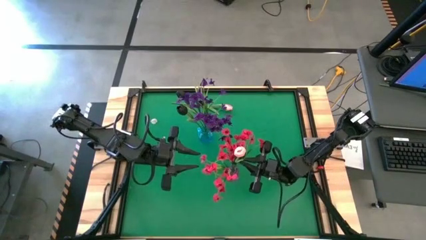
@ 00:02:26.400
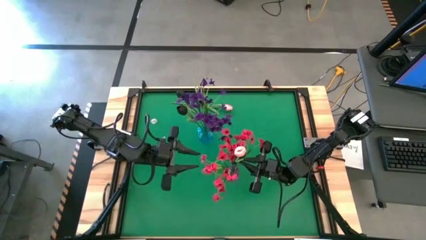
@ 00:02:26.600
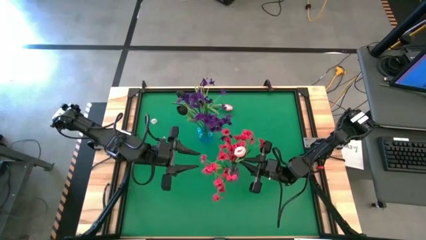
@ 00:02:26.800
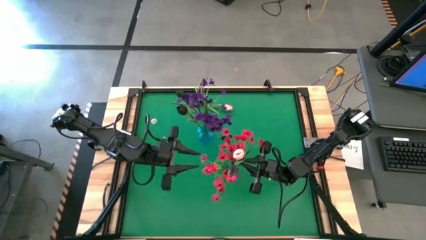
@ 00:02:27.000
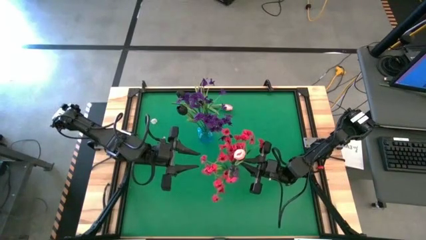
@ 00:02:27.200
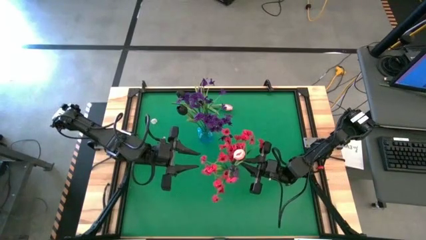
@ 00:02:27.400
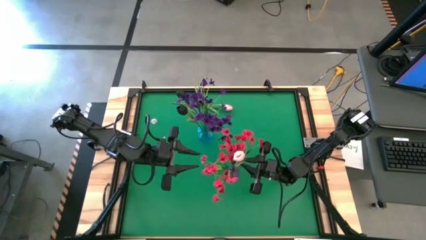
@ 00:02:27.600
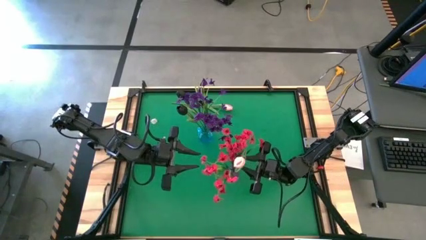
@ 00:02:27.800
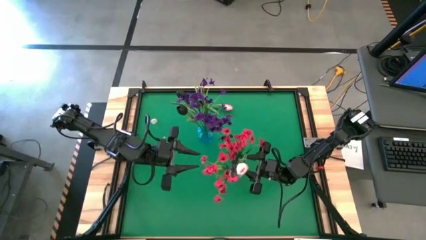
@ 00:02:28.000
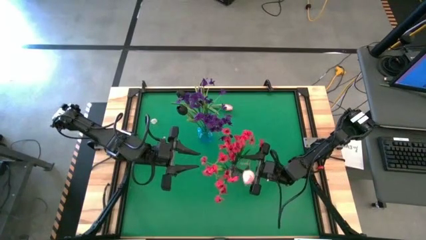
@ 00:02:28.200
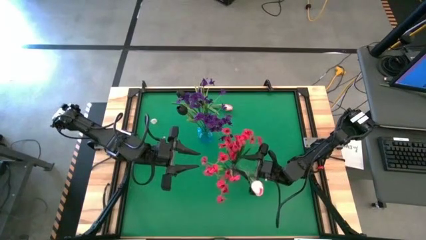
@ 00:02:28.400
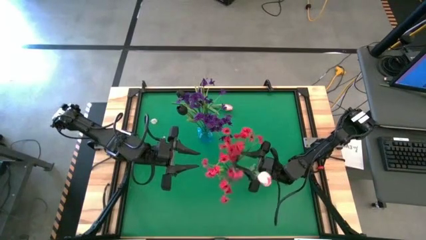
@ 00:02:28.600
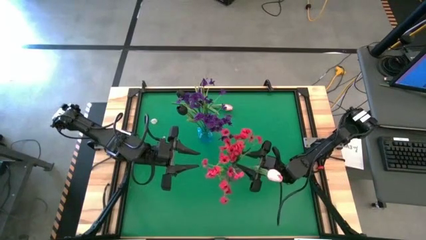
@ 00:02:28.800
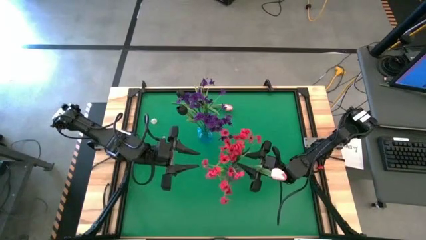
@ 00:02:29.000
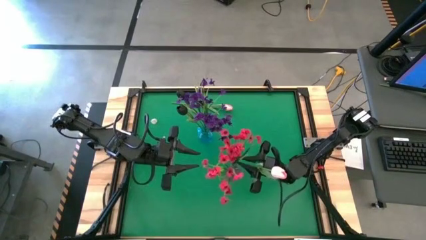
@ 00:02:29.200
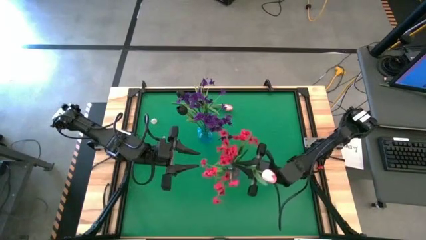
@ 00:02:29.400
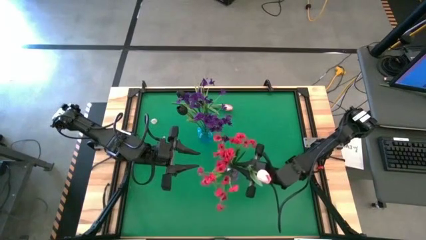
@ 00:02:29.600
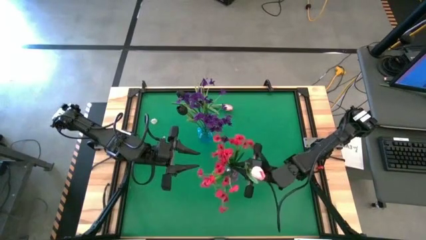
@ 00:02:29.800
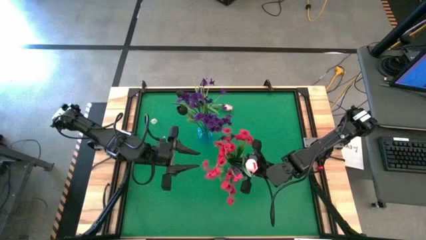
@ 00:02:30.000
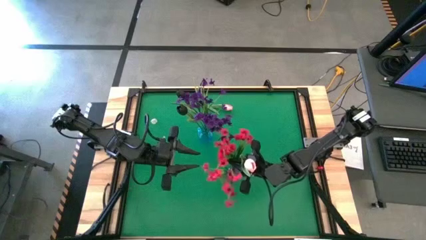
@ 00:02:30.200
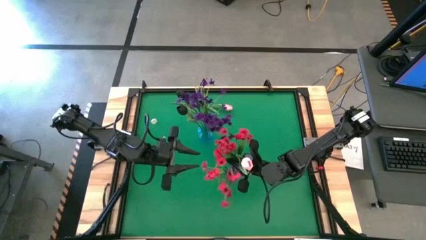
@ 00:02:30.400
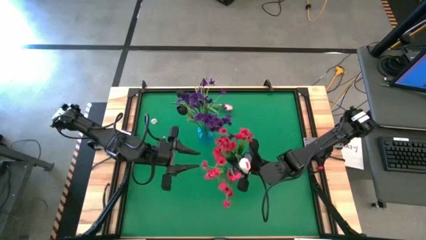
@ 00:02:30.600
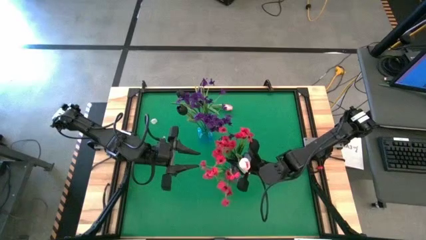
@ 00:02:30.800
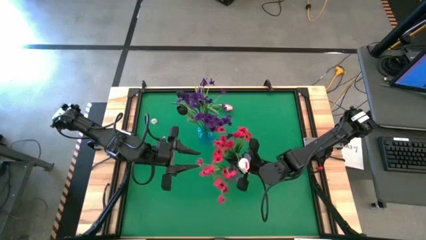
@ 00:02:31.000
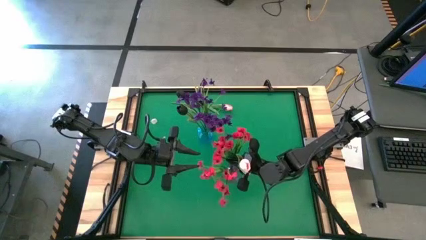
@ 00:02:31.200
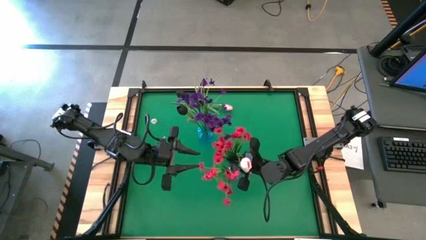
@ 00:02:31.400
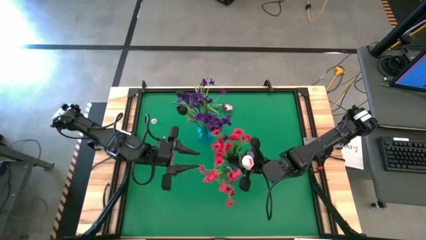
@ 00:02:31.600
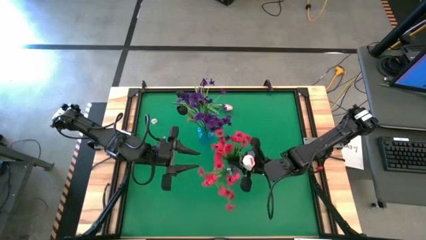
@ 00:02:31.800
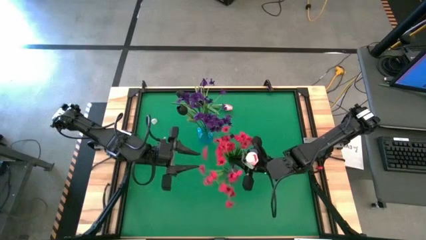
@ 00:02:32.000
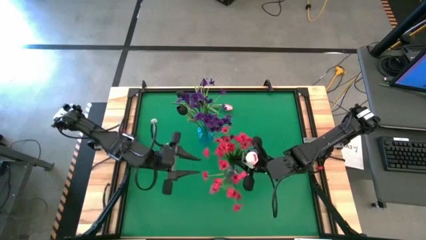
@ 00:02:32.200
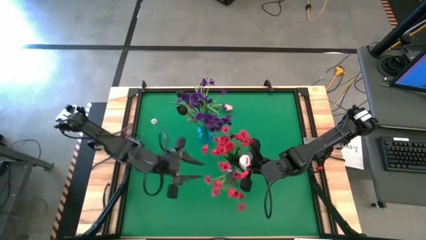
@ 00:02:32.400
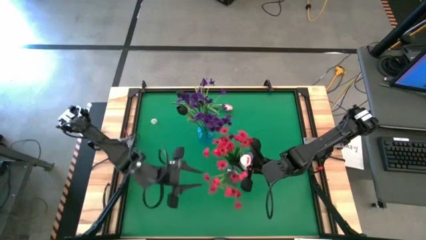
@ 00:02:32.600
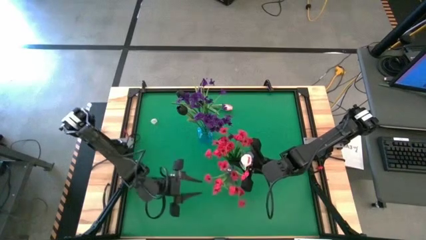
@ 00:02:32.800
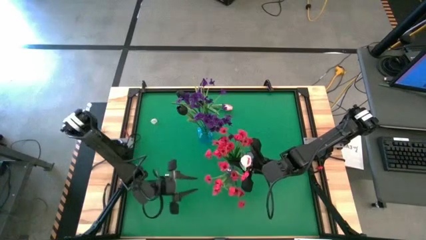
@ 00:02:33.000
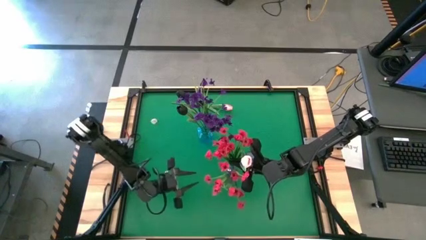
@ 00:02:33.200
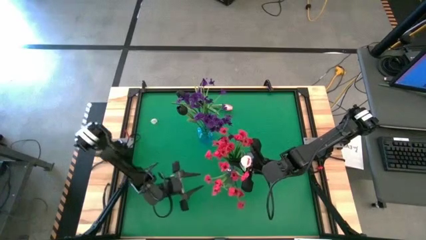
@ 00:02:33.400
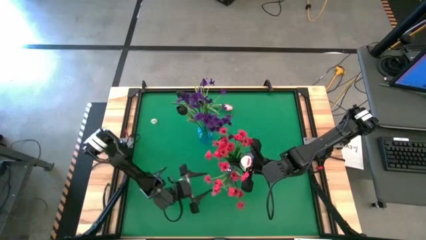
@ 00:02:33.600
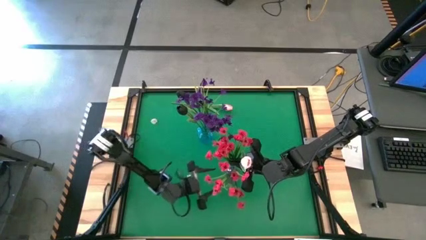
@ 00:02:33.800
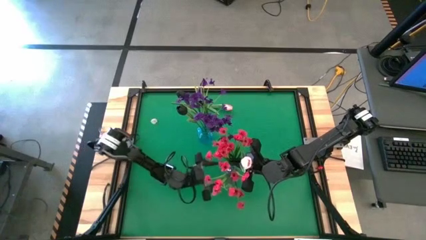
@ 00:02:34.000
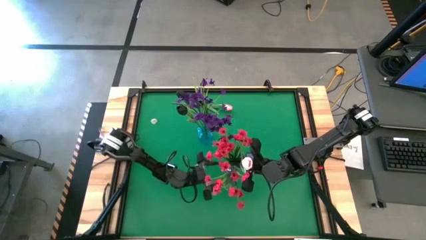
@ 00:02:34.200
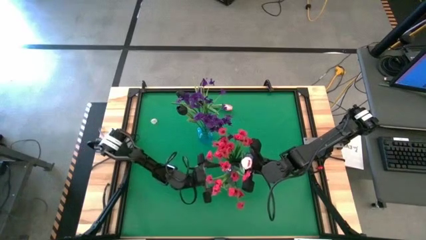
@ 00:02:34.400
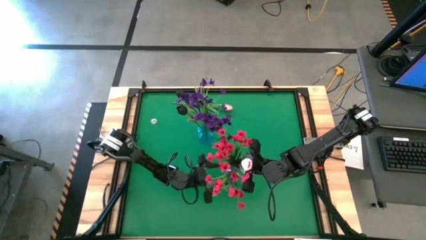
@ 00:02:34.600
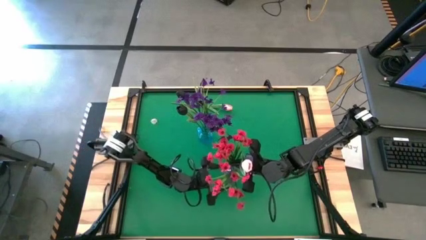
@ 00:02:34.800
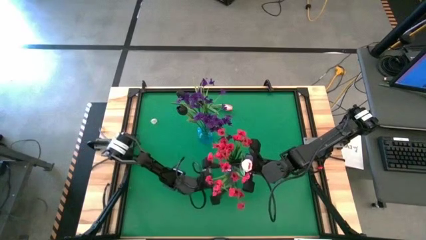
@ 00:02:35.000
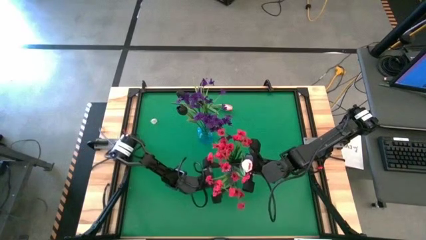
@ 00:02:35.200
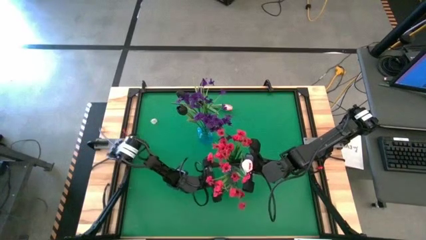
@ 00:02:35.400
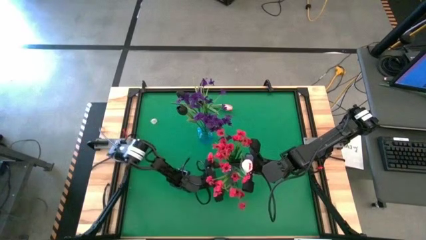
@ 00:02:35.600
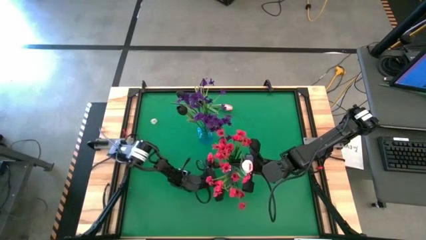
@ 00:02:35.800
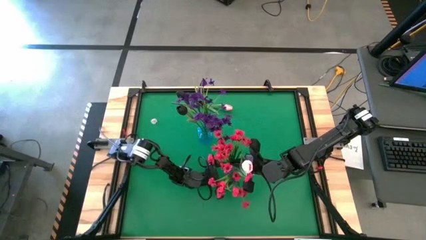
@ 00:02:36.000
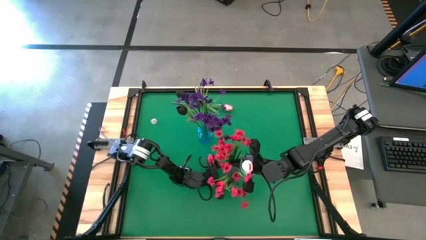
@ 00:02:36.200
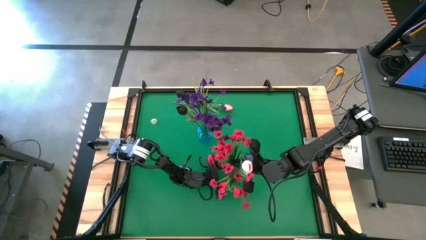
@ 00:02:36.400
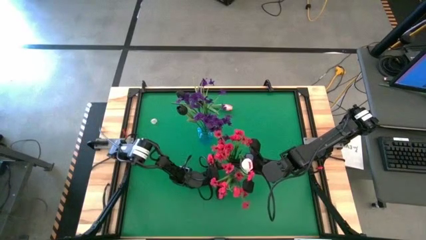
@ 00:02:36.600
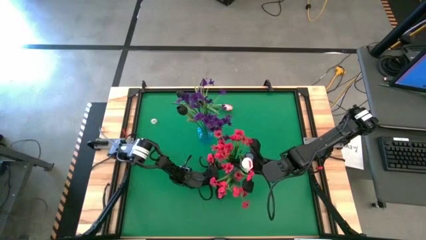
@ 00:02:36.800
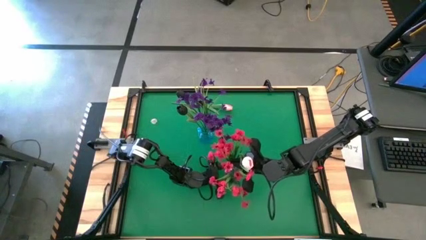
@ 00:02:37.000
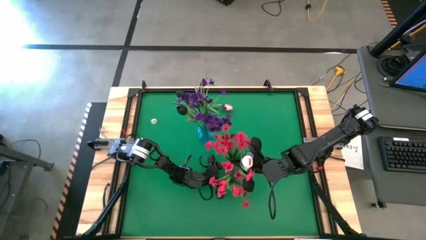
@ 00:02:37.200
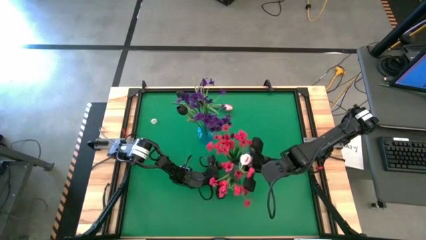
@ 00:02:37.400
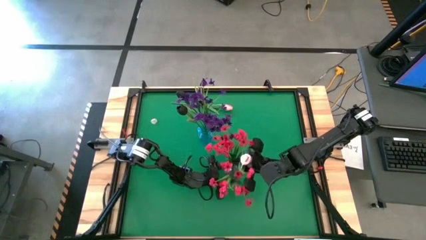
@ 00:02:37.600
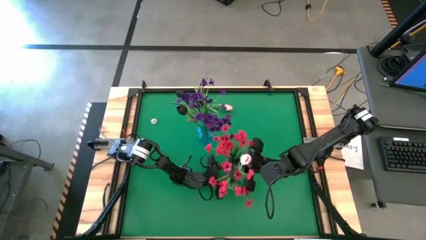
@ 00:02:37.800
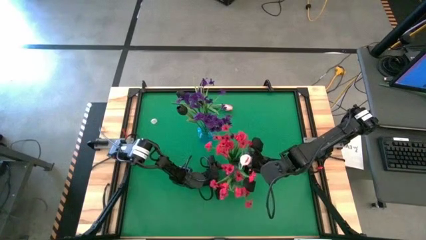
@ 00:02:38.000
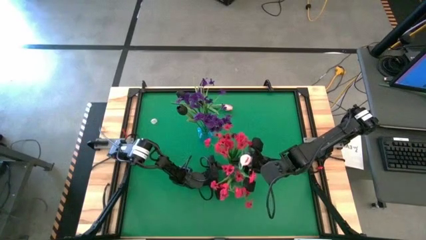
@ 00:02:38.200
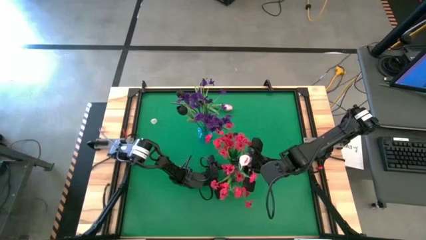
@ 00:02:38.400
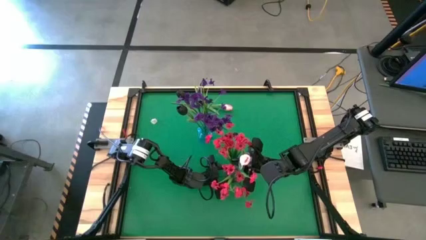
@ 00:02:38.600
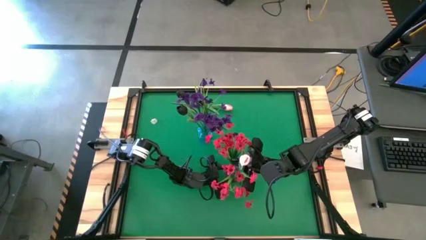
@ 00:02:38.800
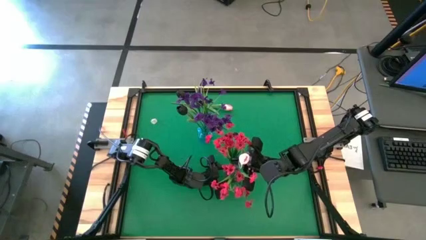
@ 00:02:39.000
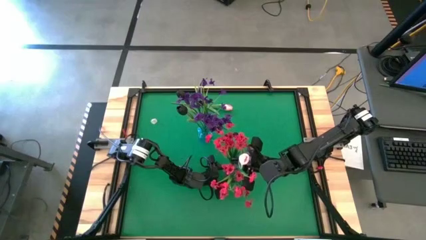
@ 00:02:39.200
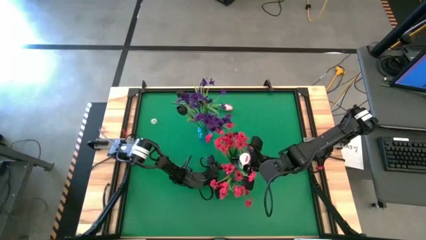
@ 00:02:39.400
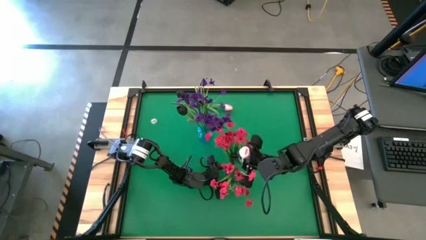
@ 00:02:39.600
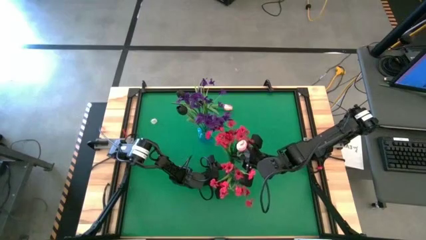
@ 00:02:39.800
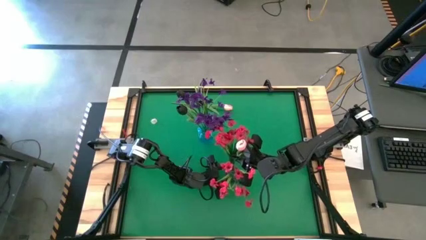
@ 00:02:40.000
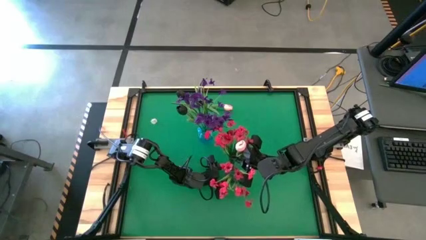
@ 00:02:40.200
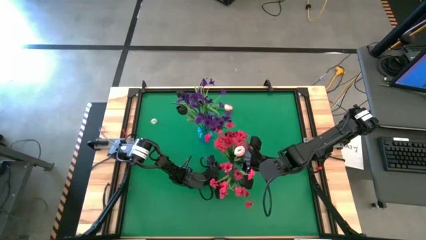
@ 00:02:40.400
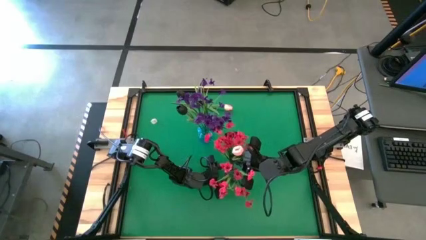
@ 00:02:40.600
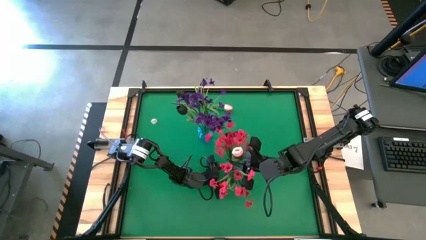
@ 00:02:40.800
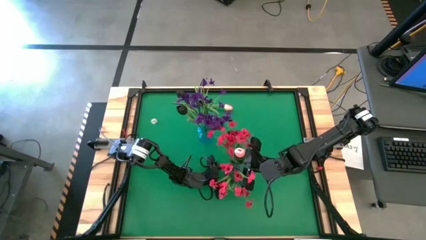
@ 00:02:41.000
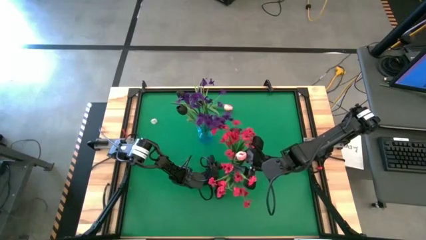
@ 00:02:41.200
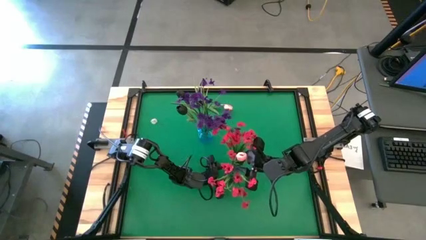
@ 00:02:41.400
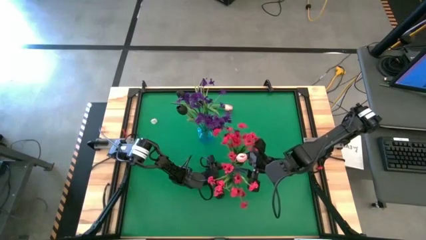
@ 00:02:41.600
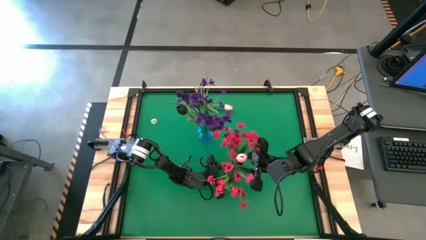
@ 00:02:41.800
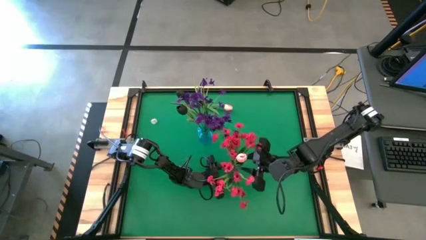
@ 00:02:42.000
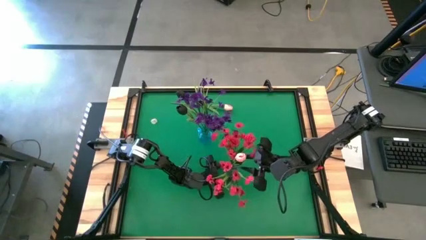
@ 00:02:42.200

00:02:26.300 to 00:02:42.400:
Task: Sort flowers into vase by color
Put the bottom pink tulip into the purple vase
